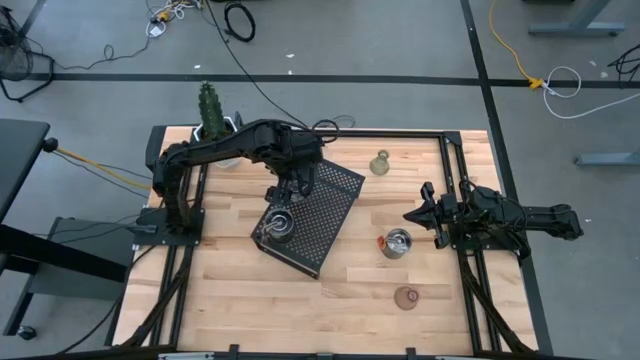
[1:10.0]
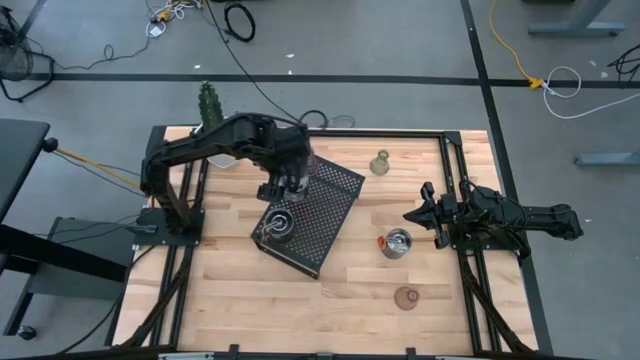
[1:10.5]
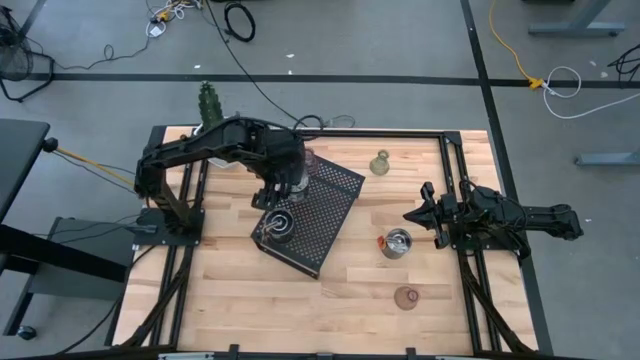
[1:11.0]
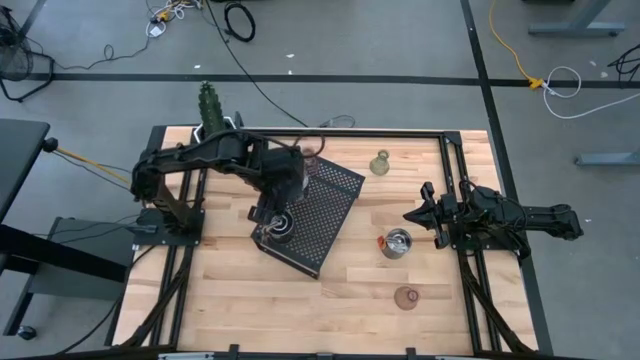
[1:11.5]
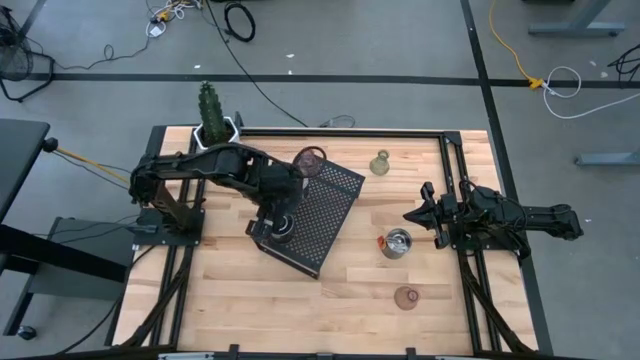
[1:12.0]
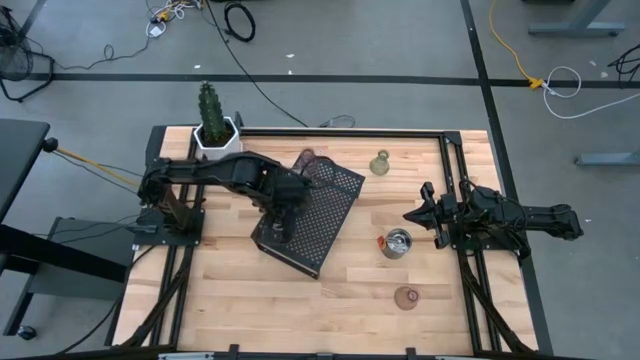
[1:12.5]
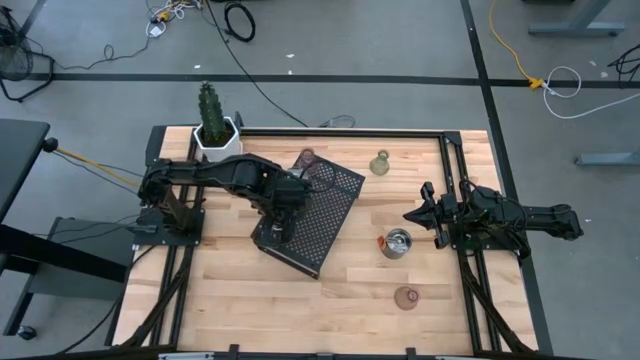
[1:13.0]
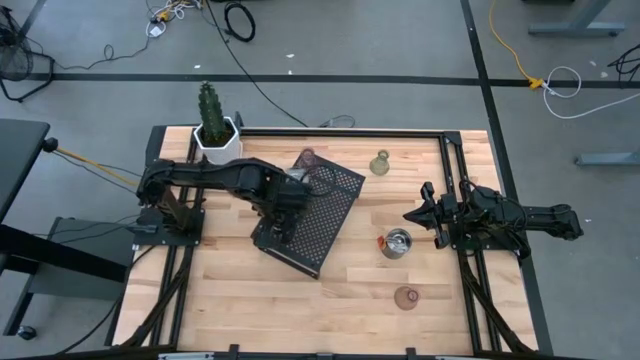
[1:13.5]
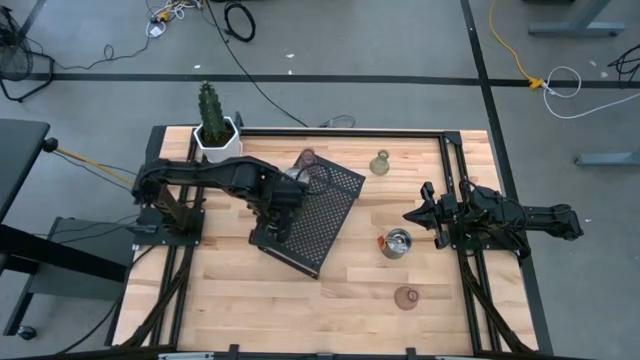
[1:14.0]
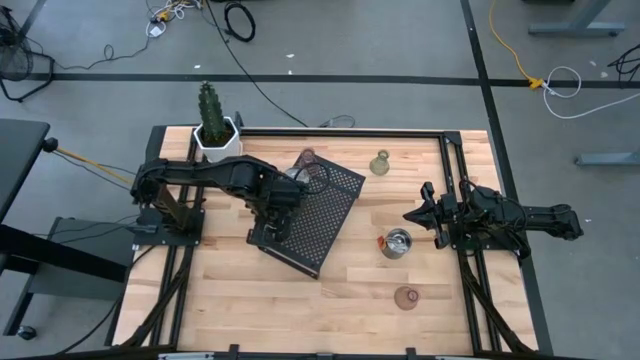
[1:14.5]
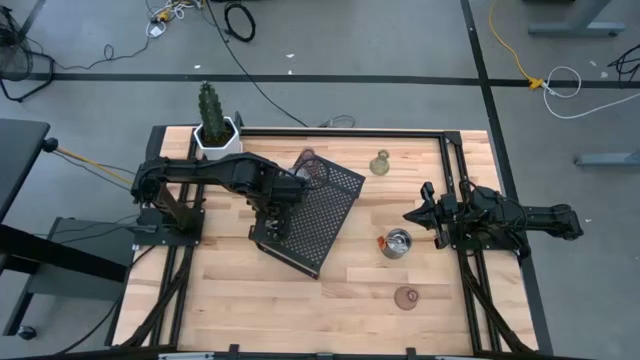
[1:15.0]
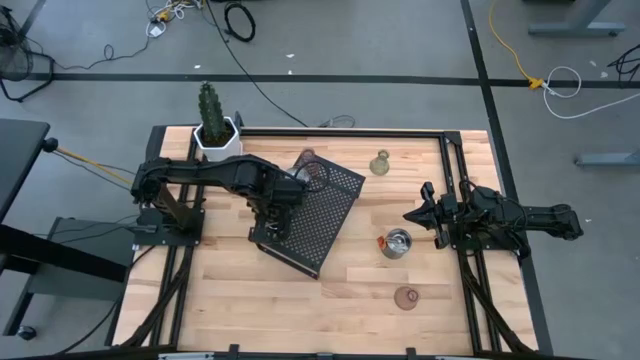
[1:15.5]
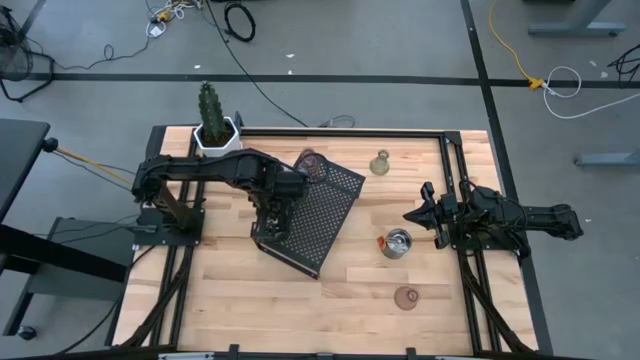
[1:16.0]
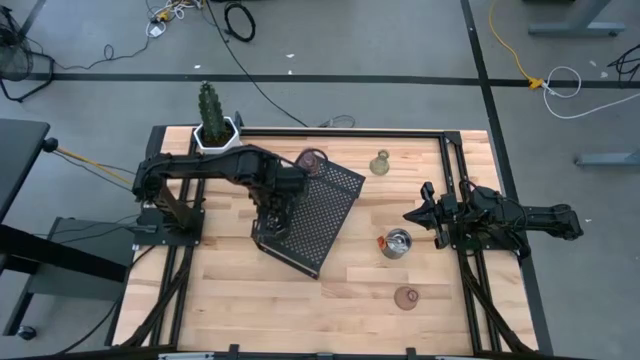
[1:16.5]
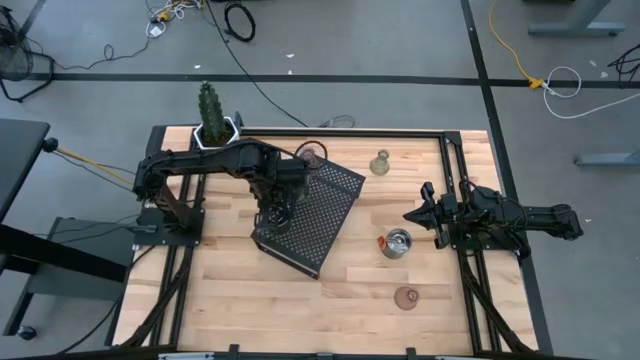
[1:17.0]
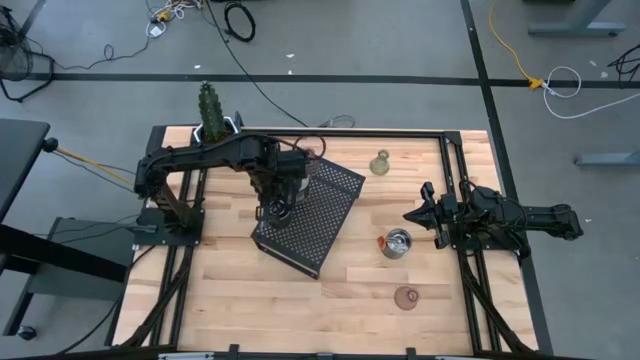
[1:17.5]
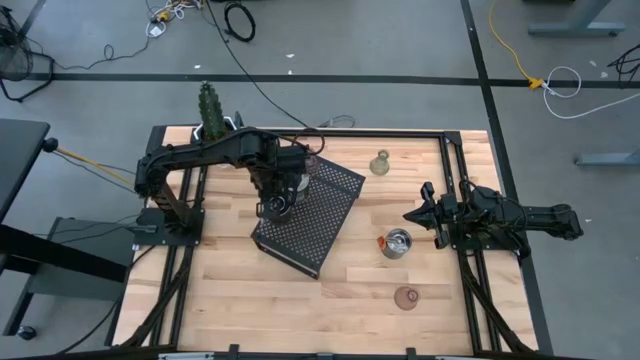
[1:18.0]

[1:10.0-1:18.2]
Task: Pick & Place candle stick holders
Adjust the silver scented candle on the shelf

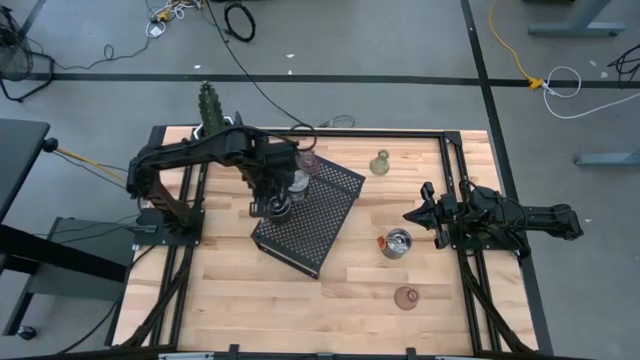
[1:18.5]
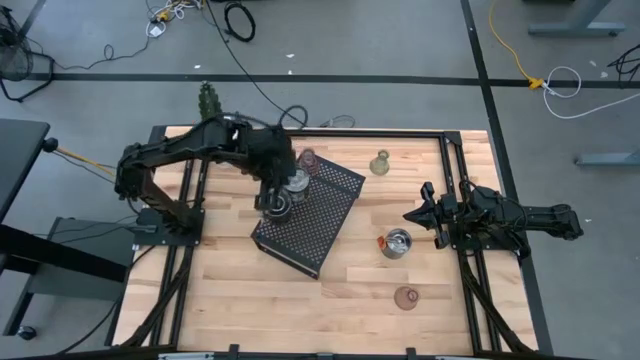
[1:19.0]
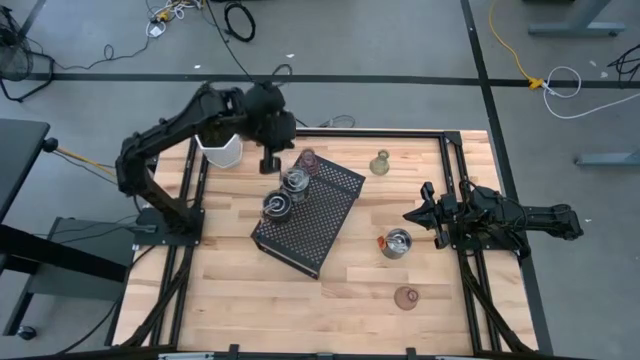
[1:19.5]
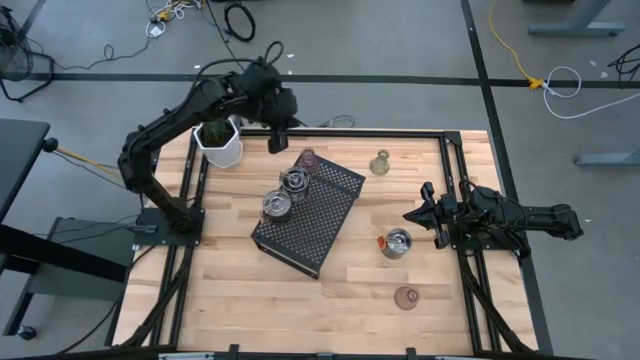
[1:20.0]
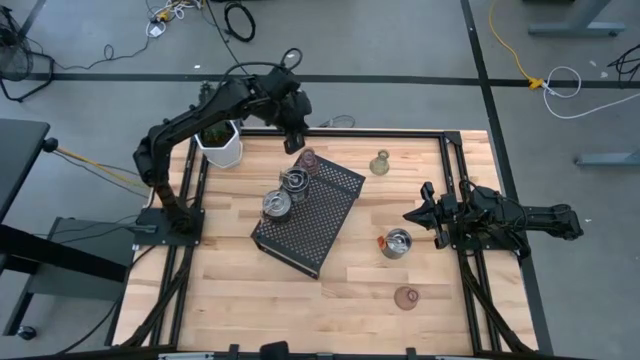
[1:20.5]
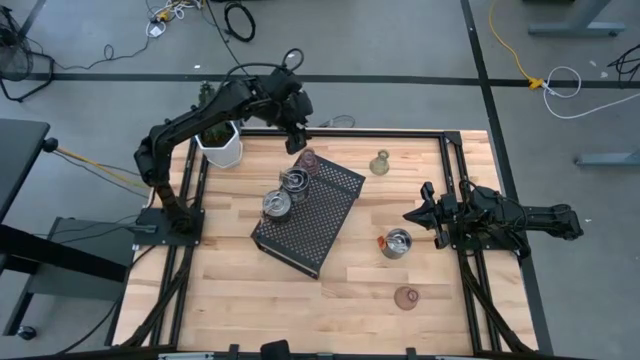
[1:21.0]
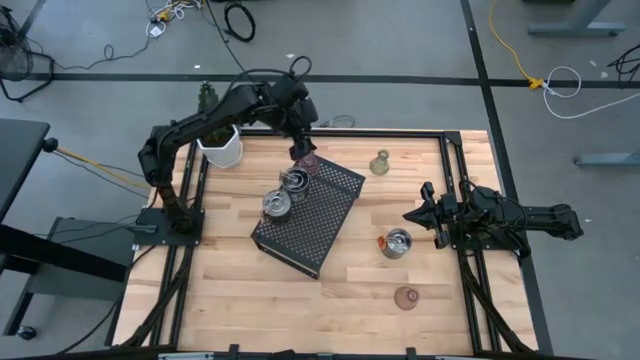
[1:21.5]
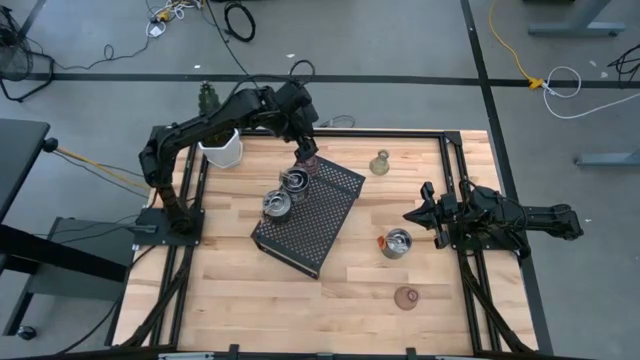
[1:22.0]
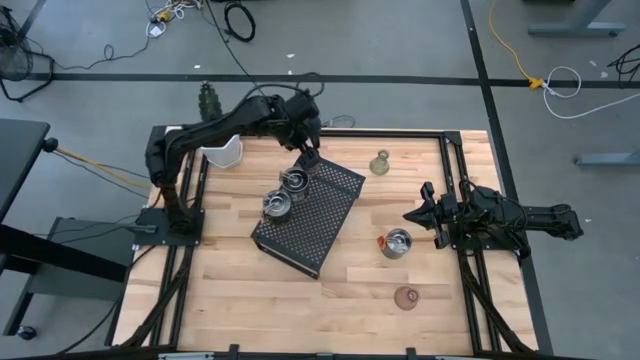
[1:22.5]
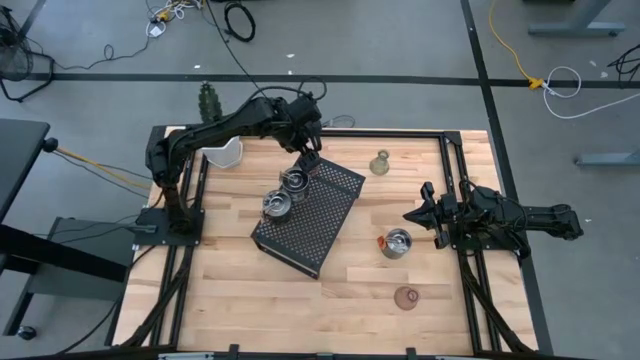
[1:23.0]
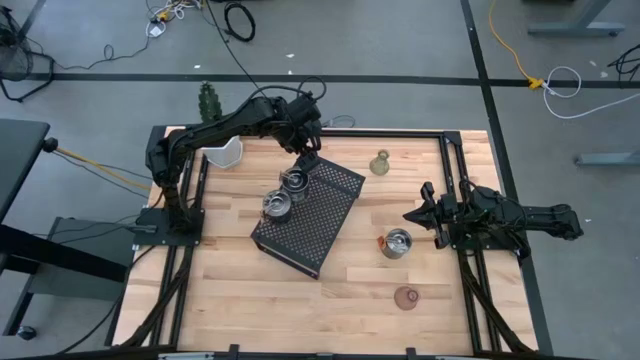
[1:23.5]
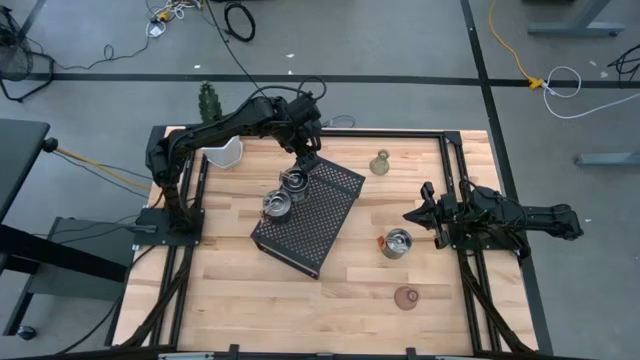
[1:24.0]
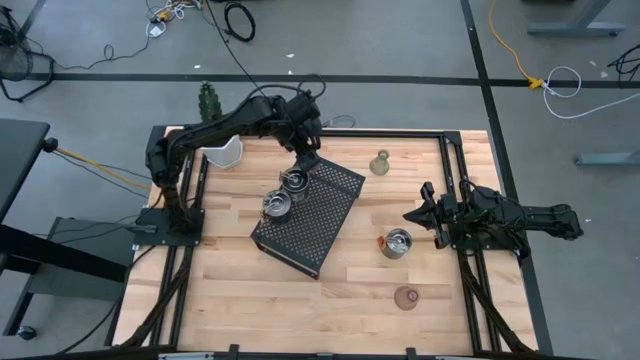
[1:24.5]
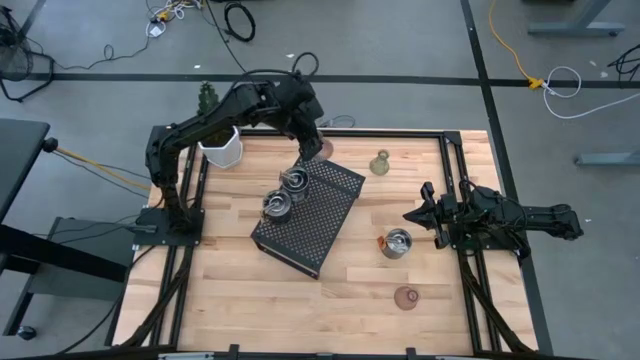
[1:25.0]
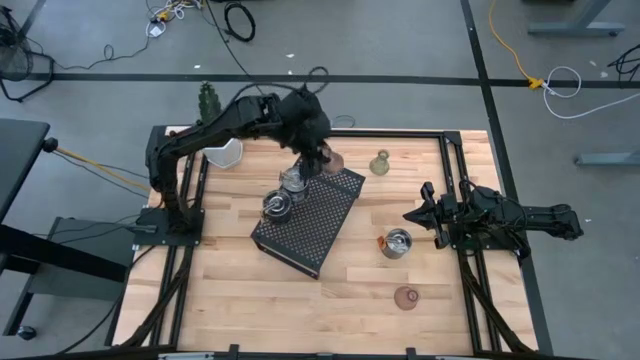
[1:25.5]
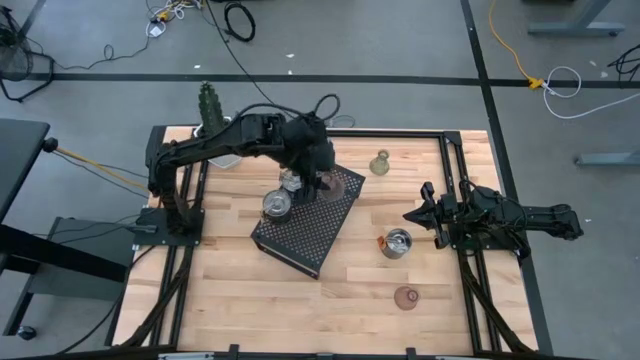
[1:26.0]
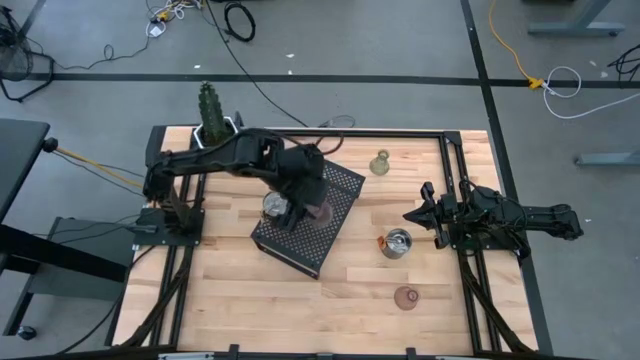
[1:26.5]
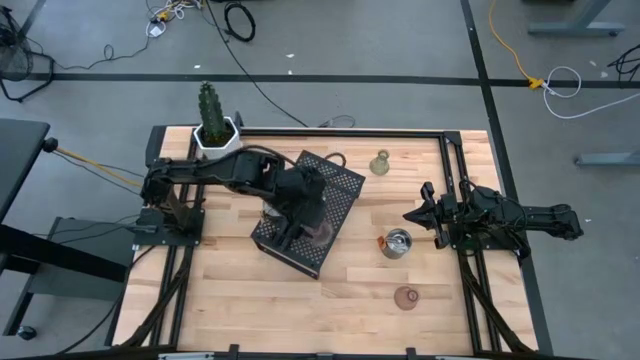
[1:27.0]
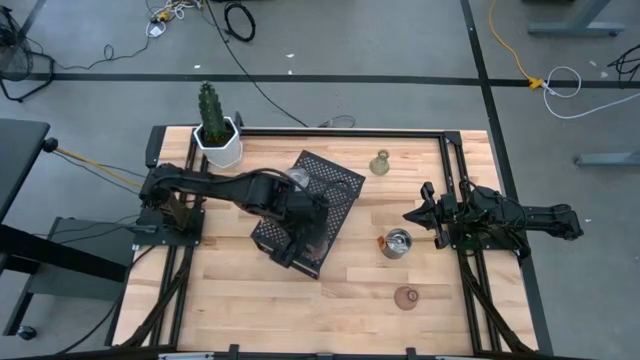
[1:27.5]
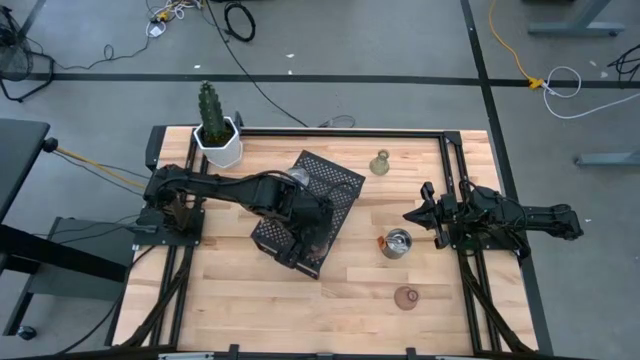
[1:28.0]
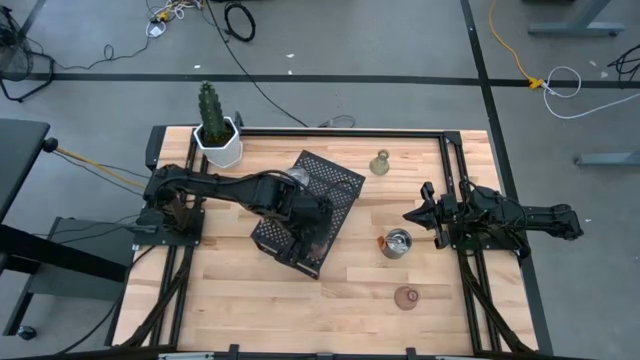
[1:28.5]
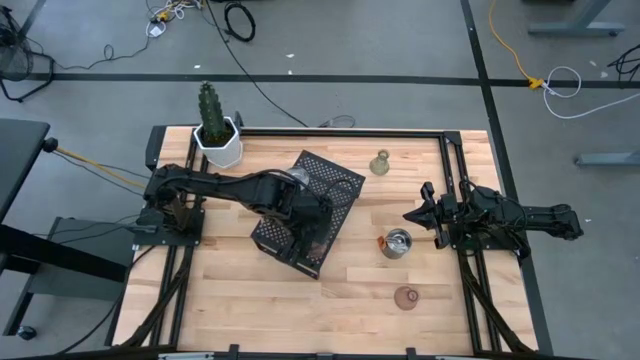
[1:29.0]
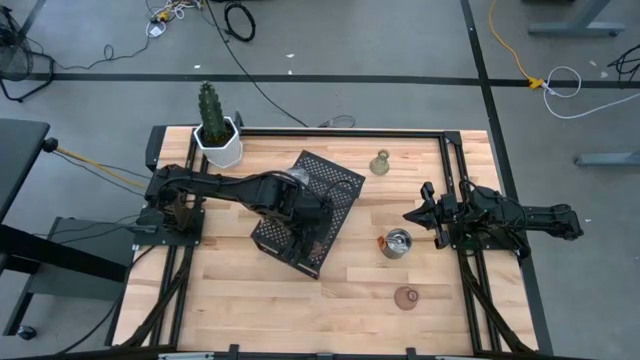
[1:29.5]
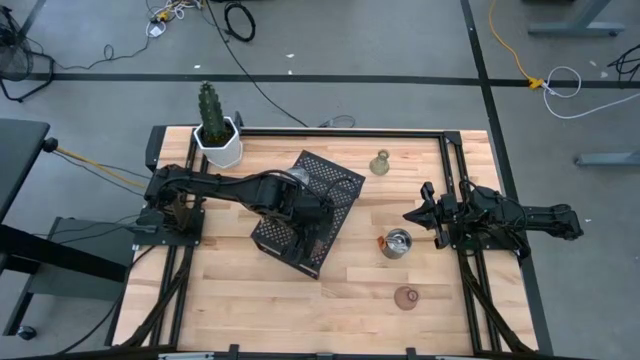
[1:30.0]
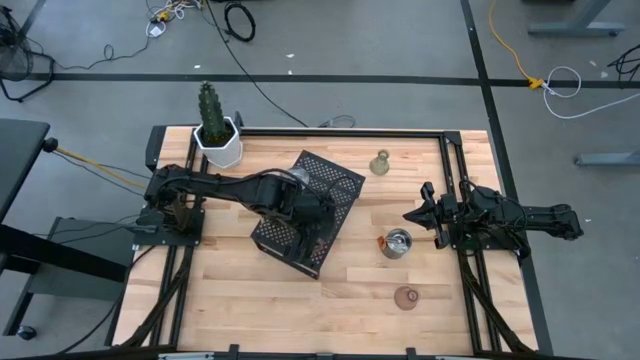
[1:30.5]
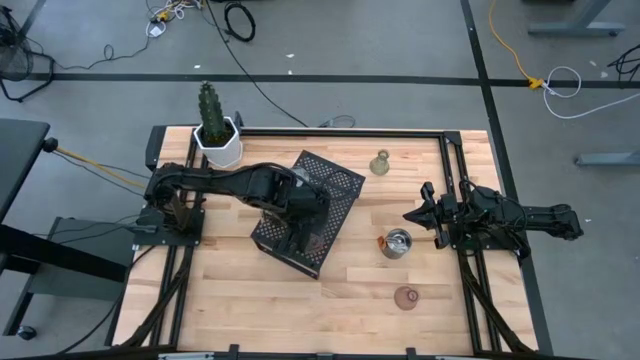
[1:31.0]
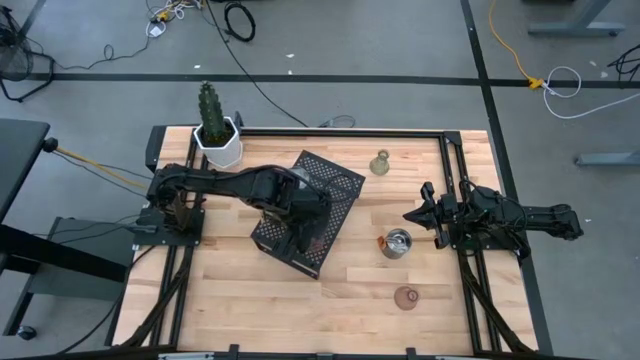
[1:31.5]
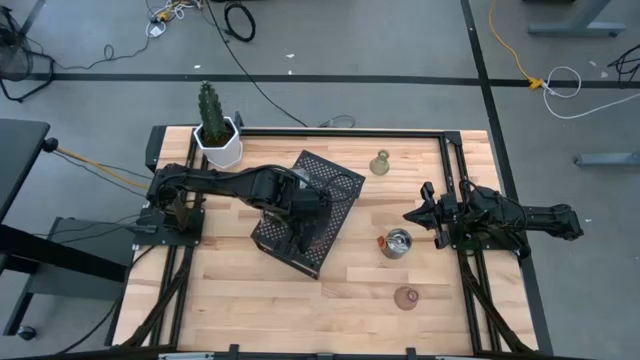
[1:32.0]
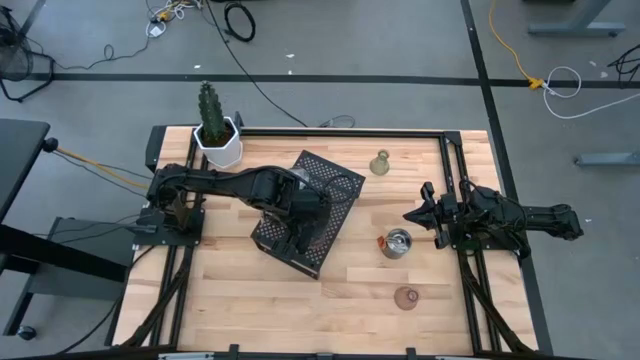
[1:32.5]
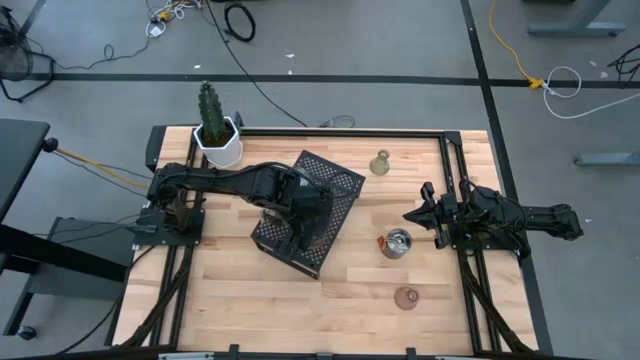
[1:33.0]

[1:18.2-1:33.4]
Adjust the purple candle holder on the shelf
